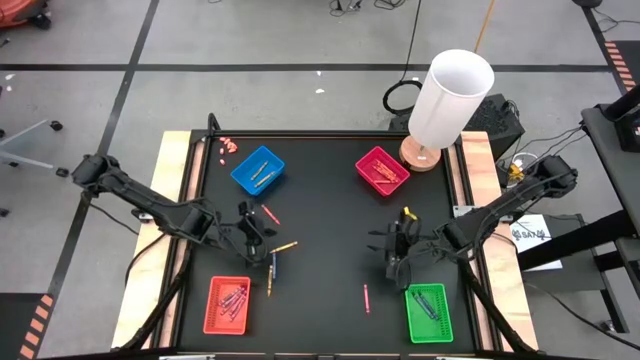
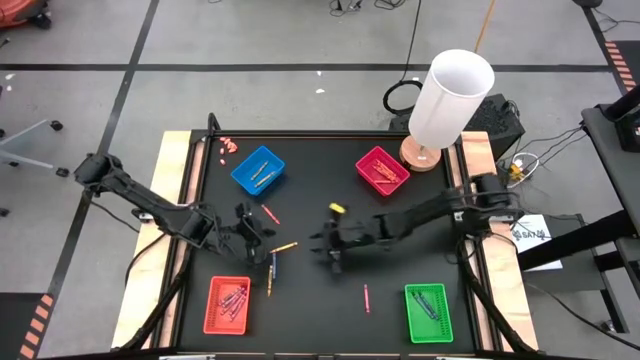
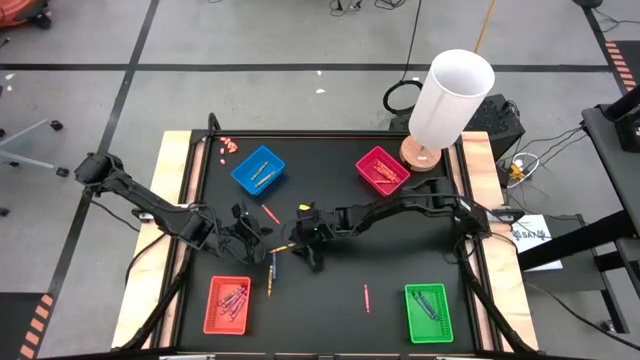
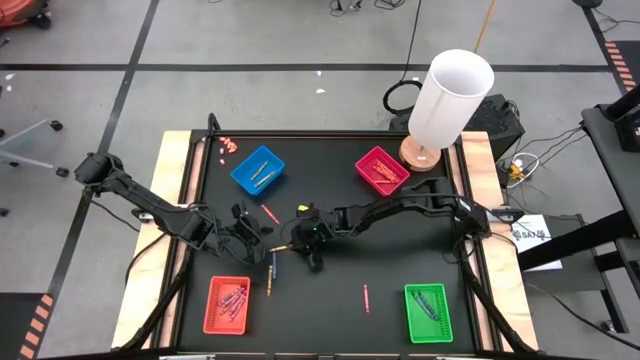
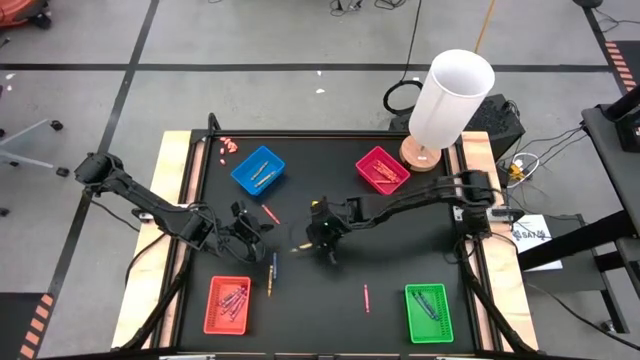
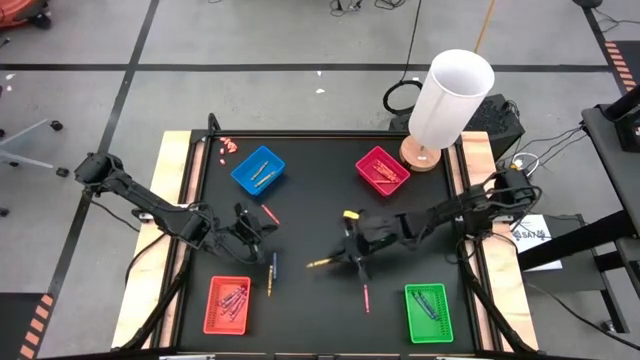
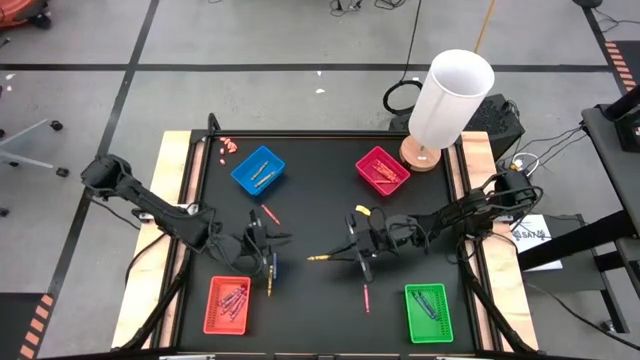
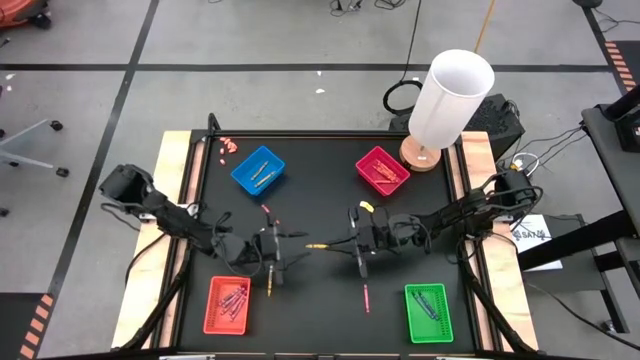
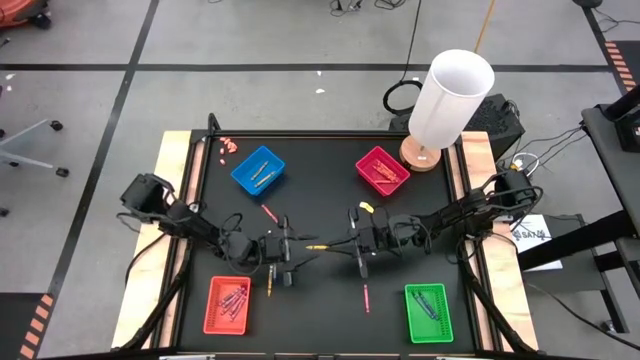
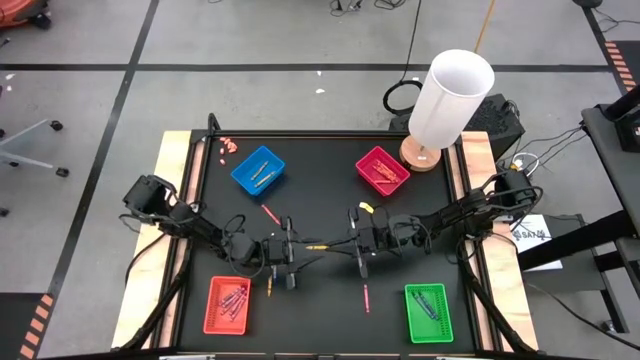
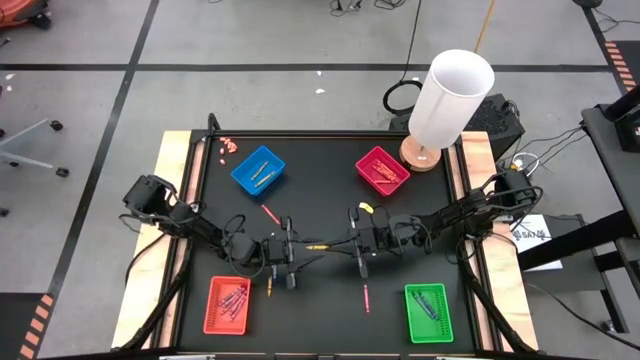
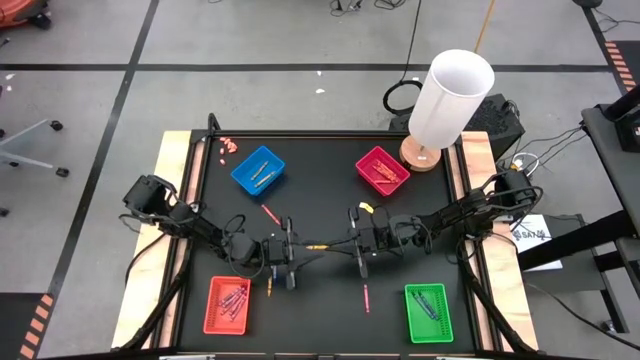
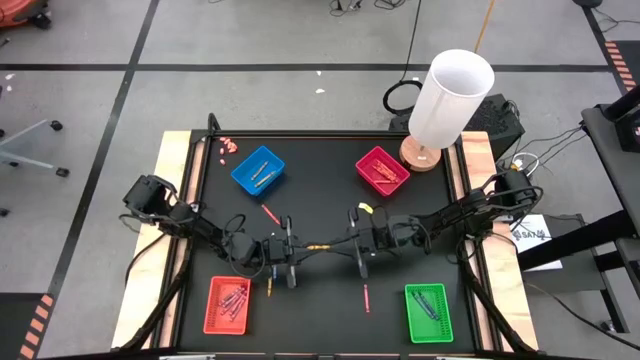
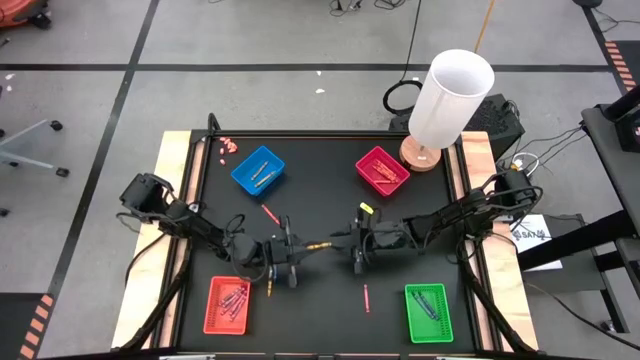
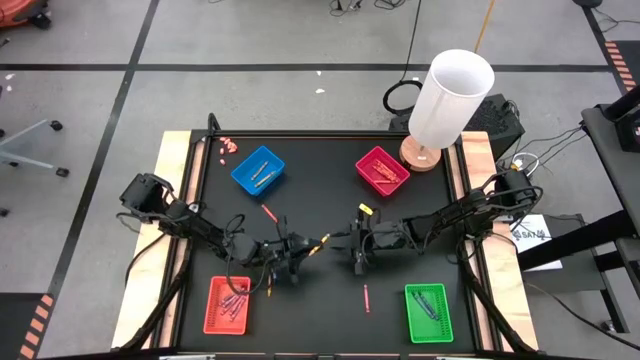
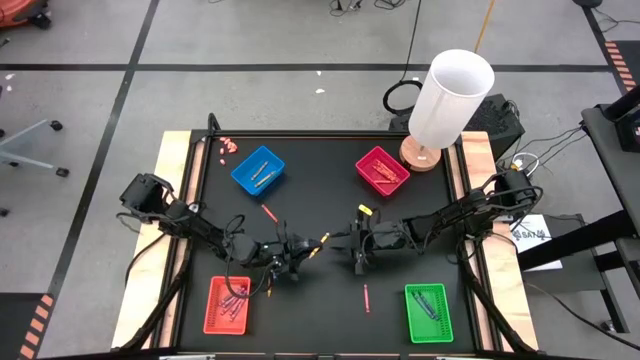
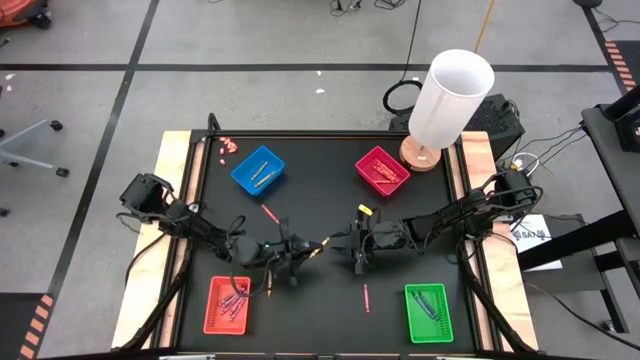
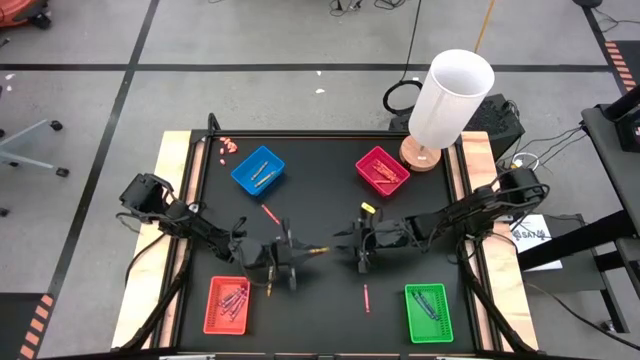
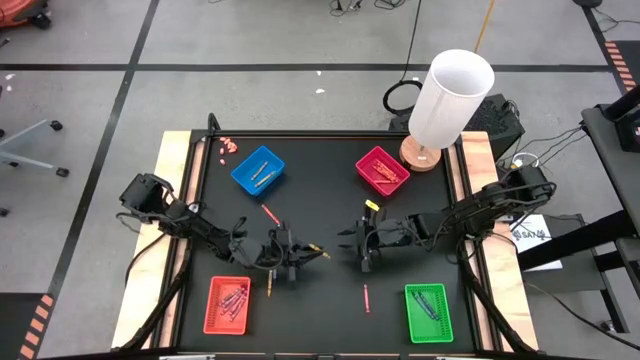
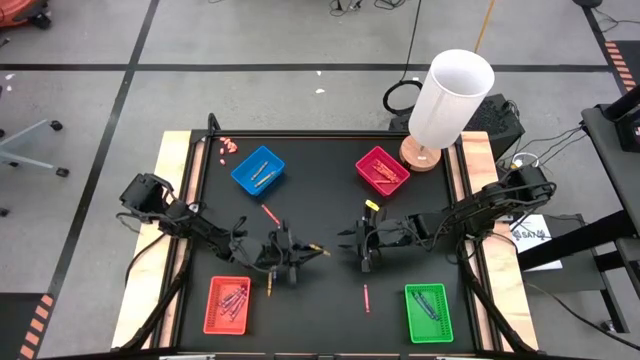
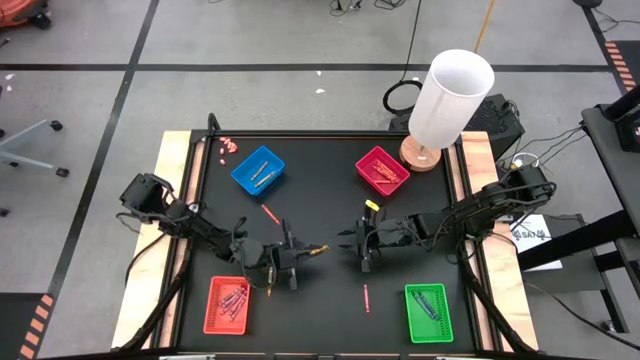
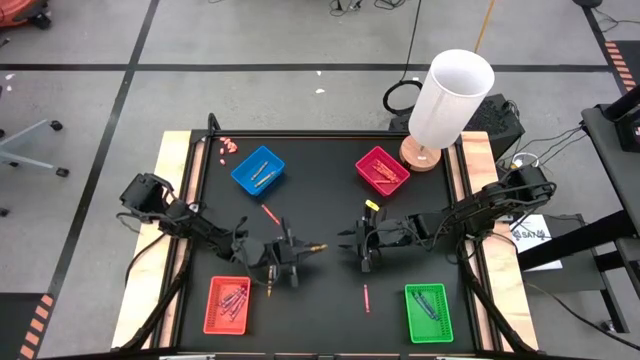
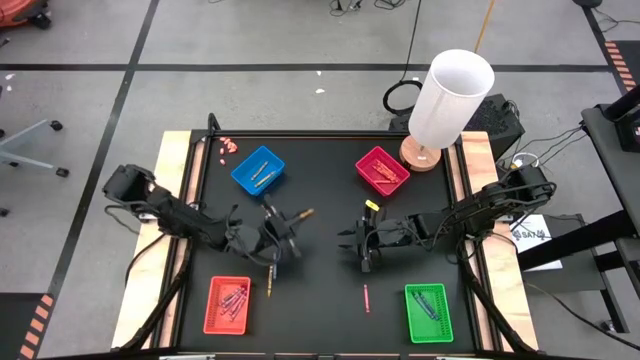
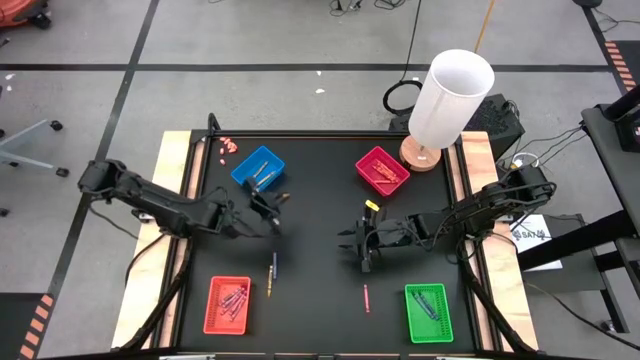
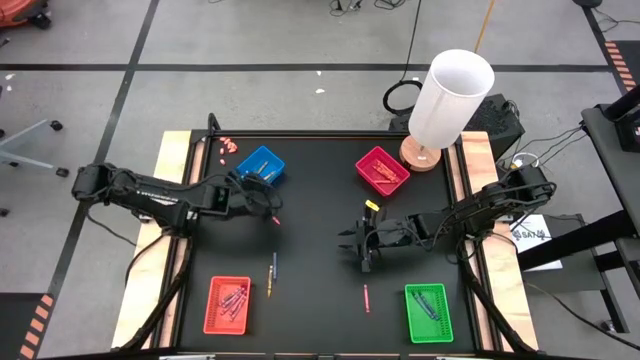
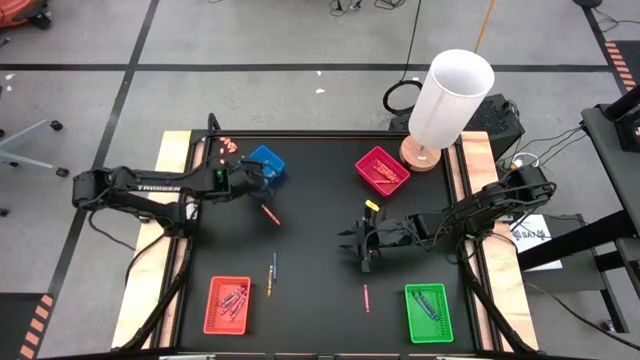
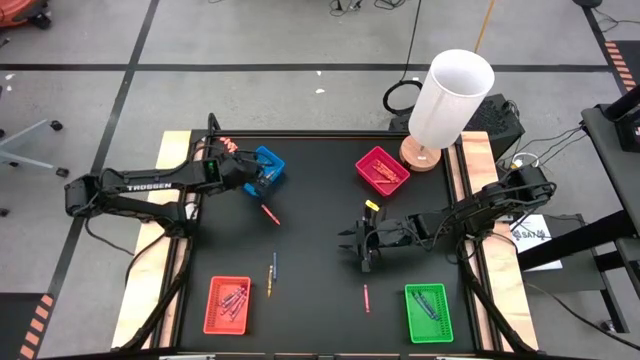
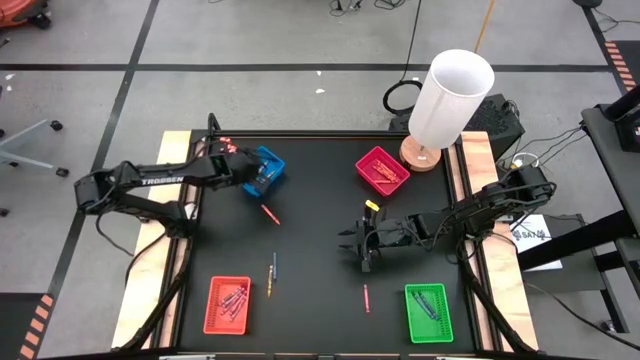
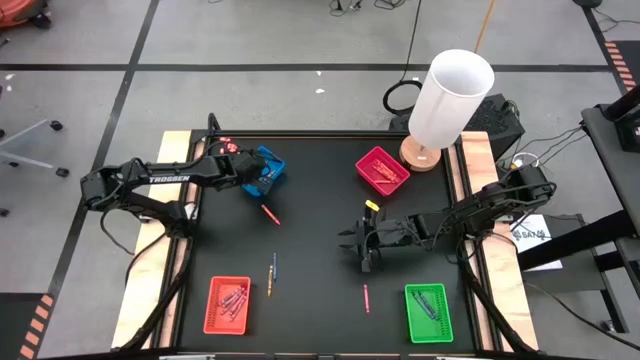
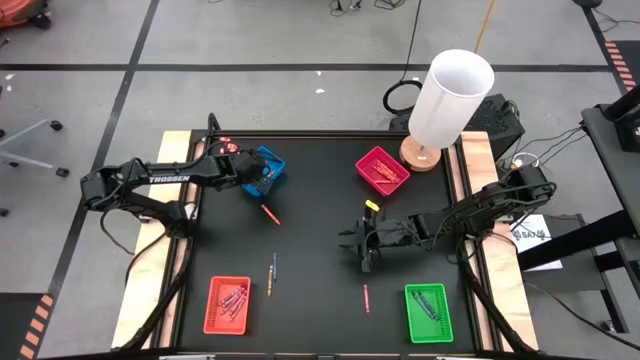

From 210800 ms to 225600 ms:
Task: Sort crayons
Put the yellow crayon into the blue bin

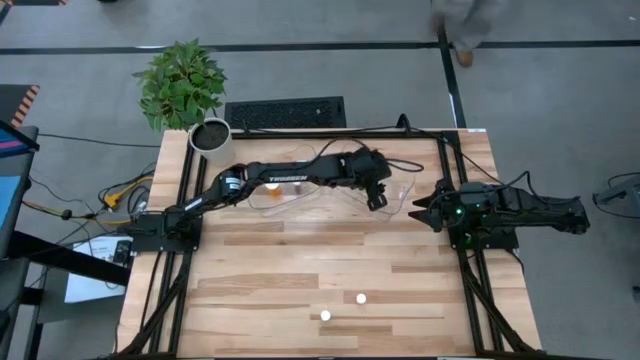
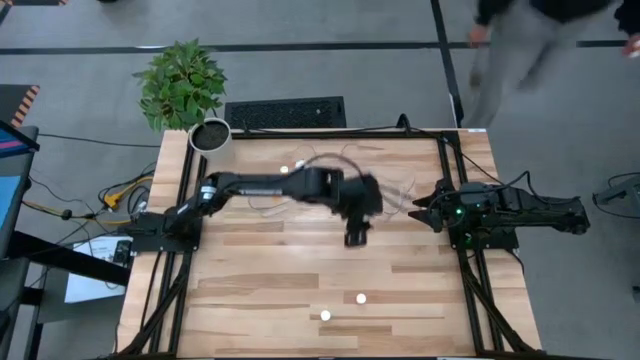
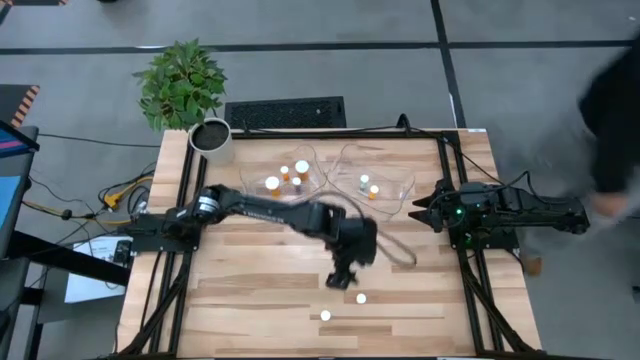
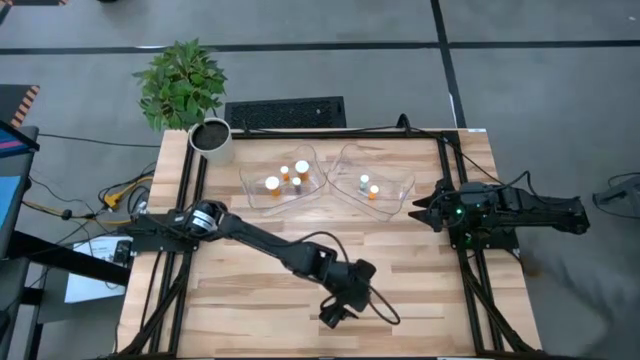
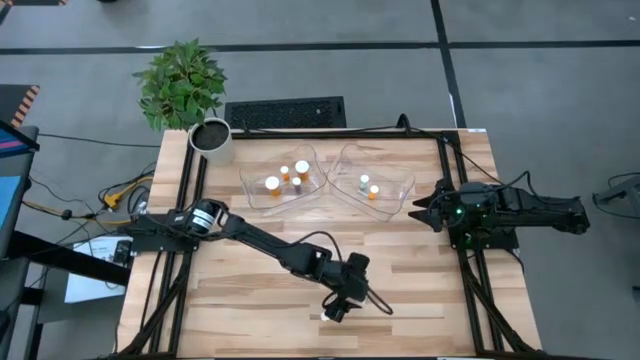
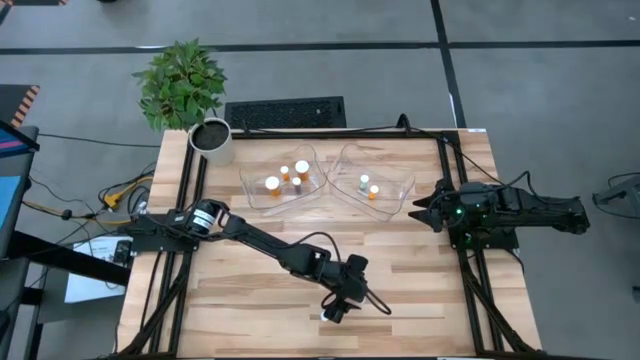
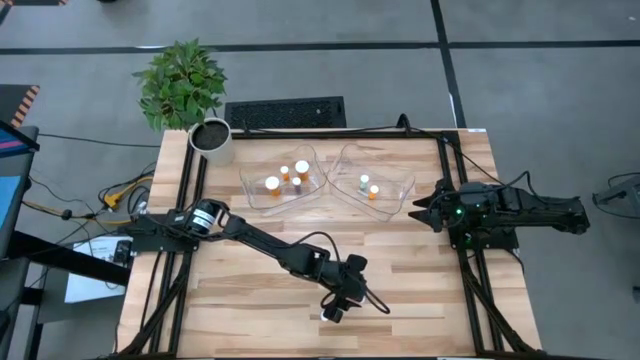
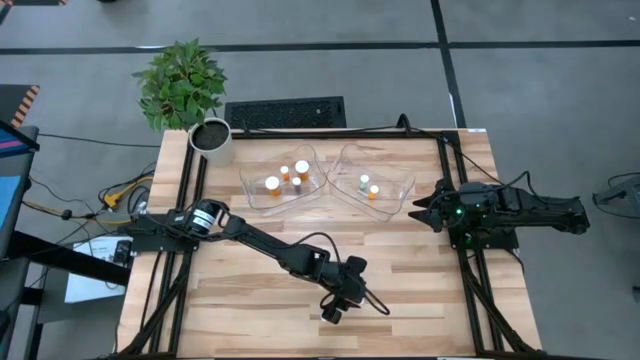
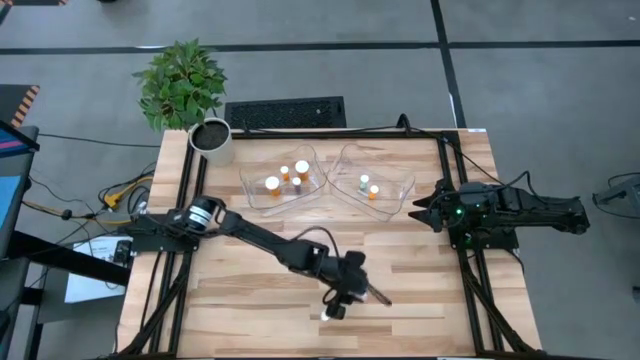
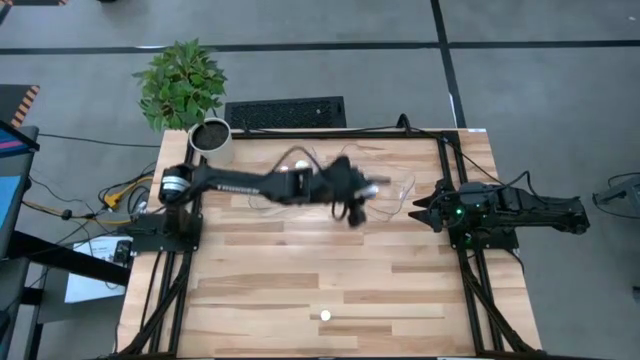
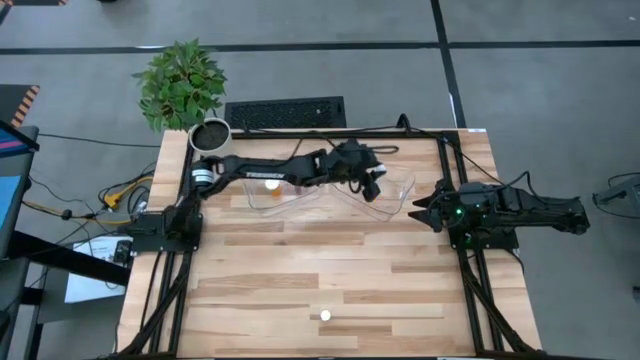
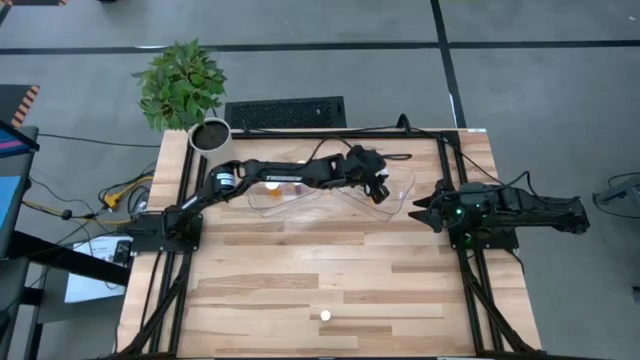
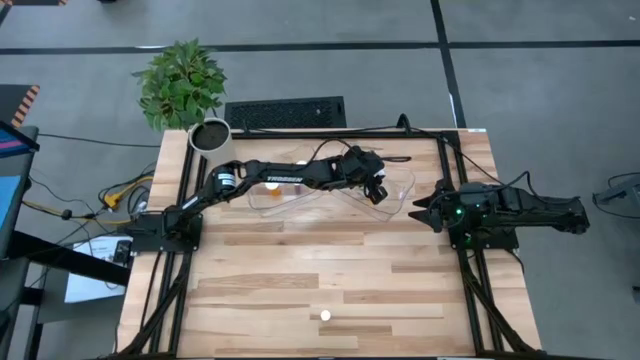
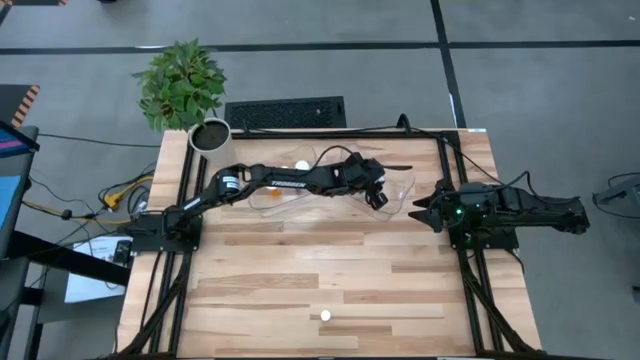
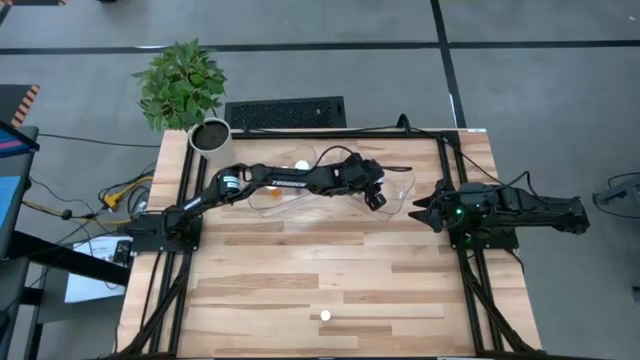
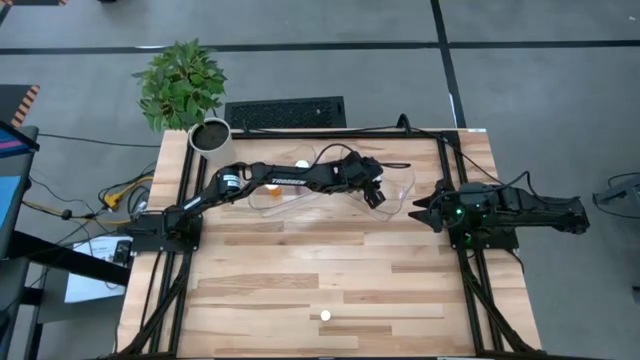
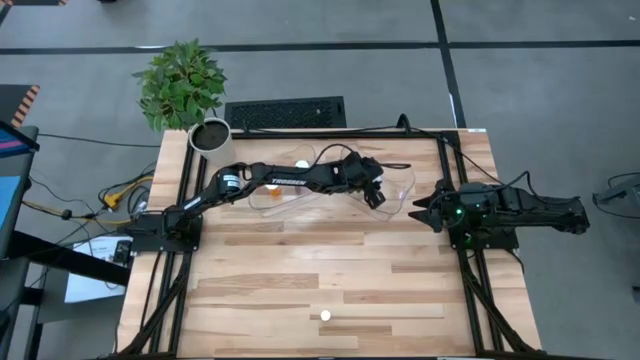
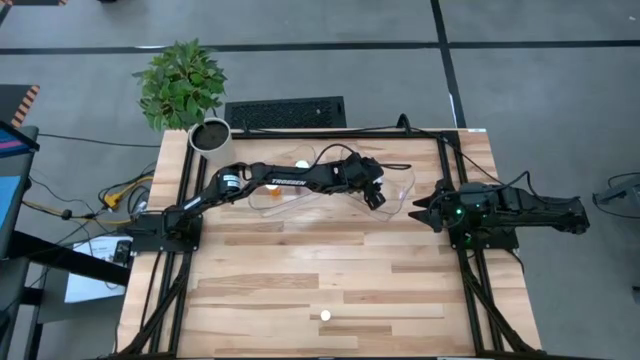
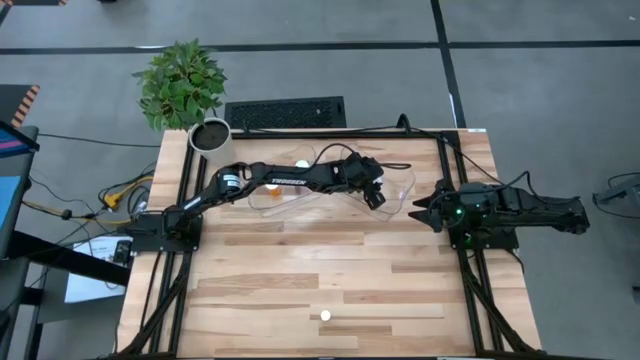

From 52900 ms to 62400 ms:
Task: Pick and place medicine bottles into bin by pill shape (circle, oval)
Put the pink tablet bottle into the right transparent bin
